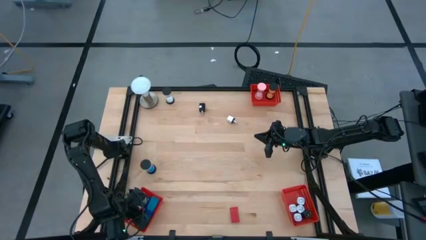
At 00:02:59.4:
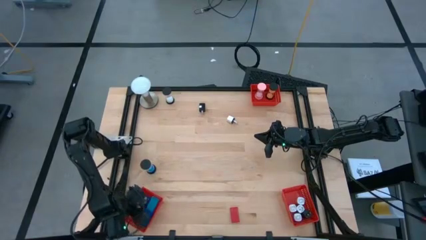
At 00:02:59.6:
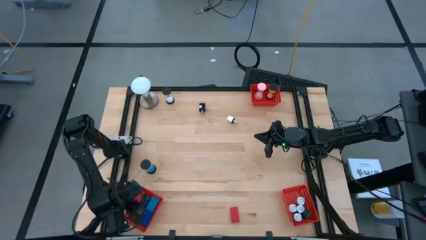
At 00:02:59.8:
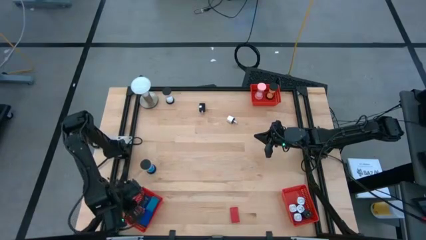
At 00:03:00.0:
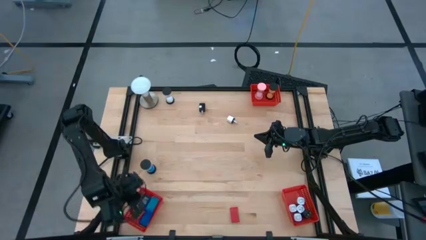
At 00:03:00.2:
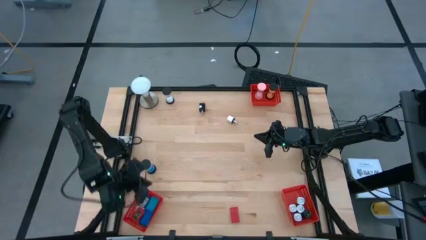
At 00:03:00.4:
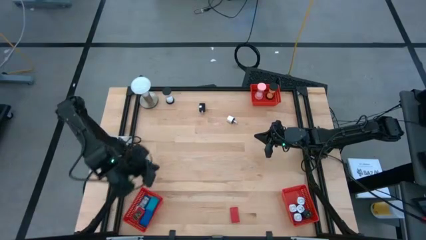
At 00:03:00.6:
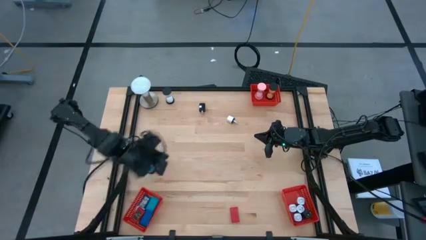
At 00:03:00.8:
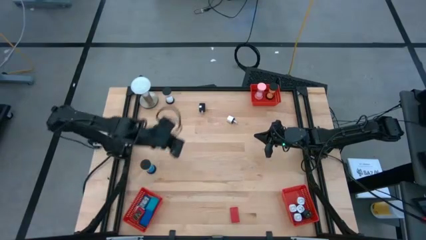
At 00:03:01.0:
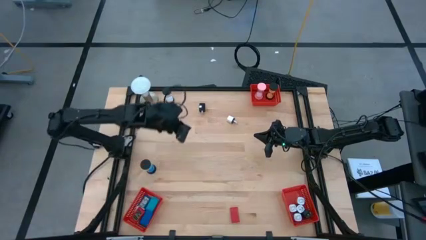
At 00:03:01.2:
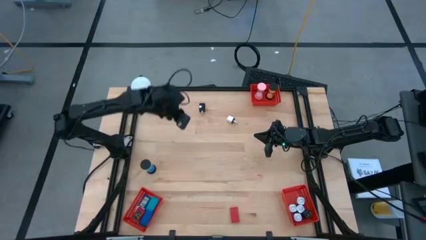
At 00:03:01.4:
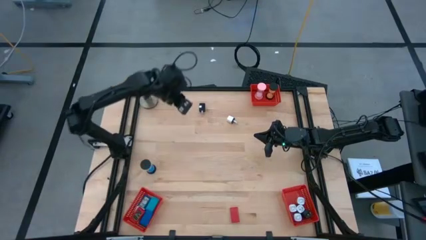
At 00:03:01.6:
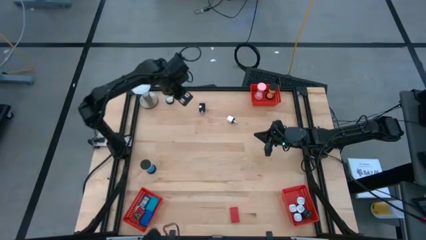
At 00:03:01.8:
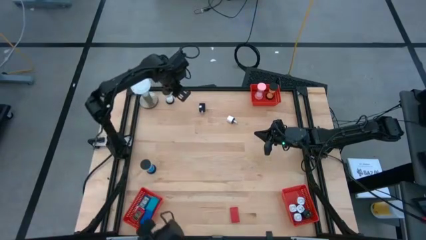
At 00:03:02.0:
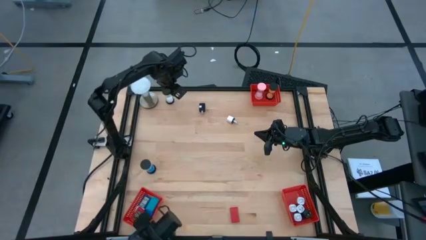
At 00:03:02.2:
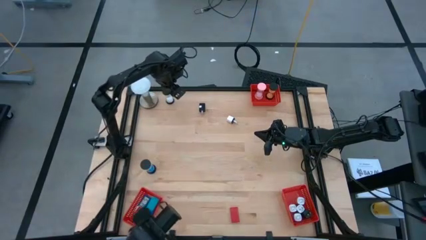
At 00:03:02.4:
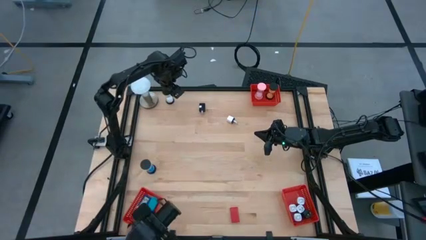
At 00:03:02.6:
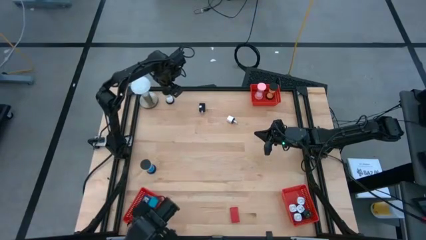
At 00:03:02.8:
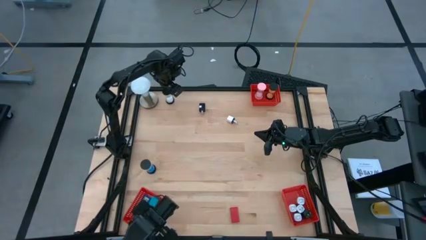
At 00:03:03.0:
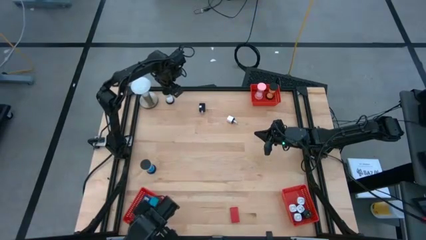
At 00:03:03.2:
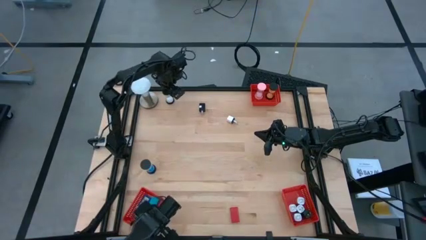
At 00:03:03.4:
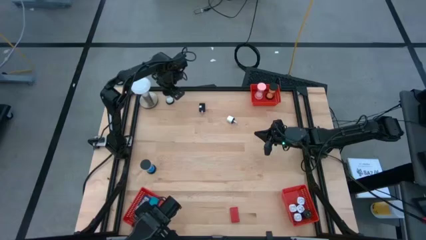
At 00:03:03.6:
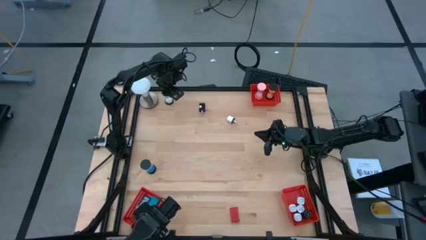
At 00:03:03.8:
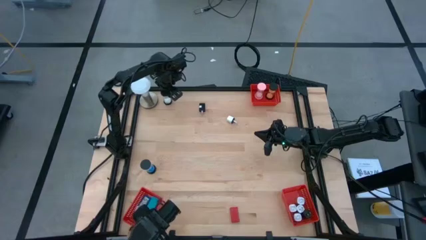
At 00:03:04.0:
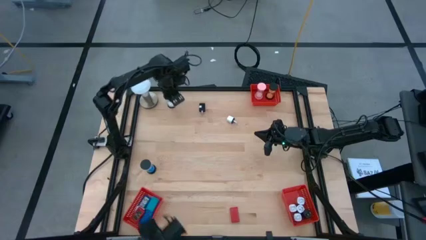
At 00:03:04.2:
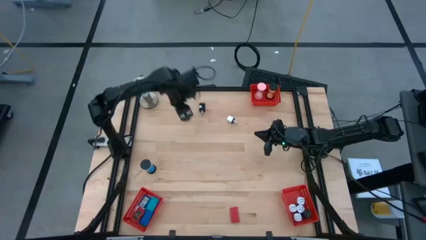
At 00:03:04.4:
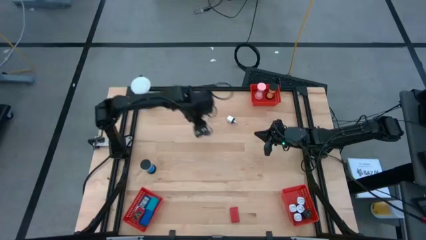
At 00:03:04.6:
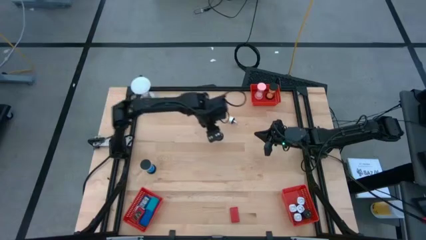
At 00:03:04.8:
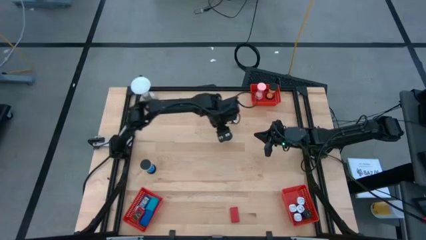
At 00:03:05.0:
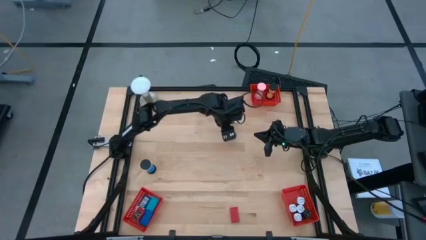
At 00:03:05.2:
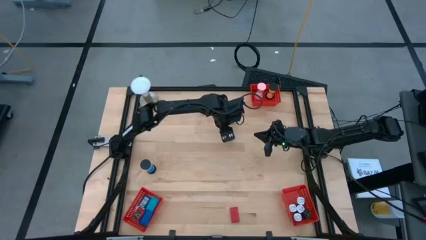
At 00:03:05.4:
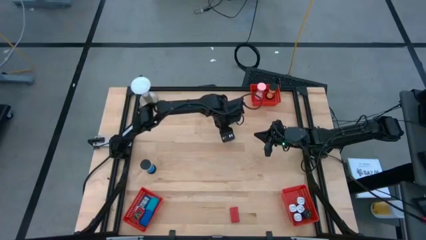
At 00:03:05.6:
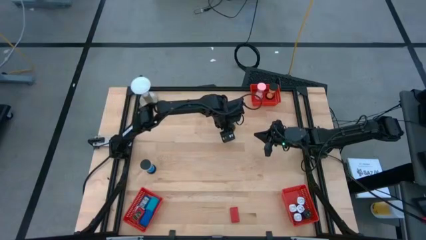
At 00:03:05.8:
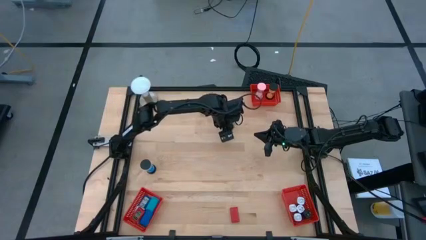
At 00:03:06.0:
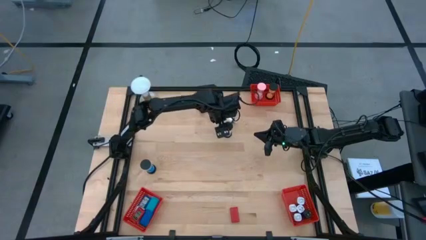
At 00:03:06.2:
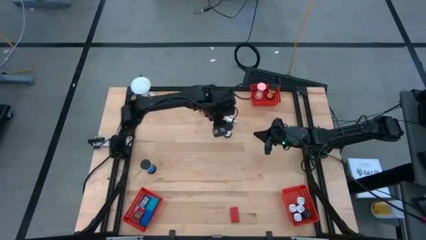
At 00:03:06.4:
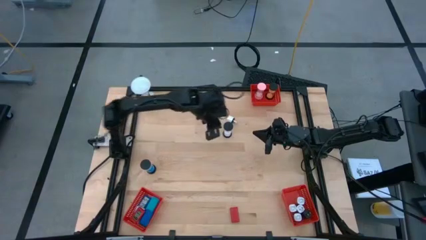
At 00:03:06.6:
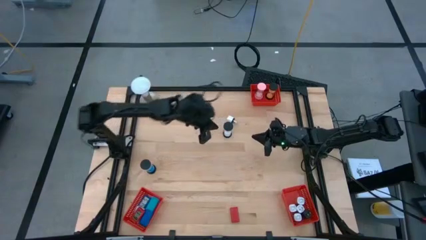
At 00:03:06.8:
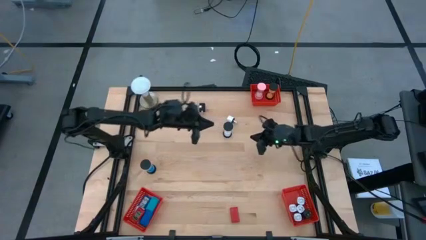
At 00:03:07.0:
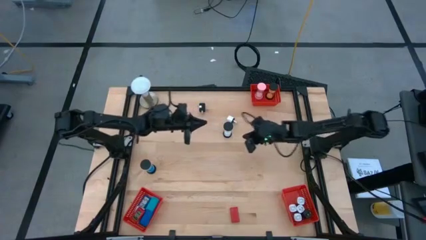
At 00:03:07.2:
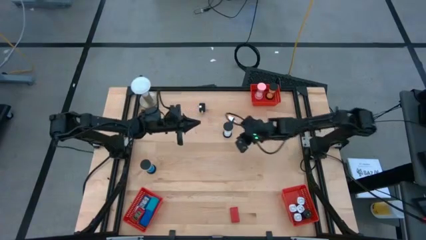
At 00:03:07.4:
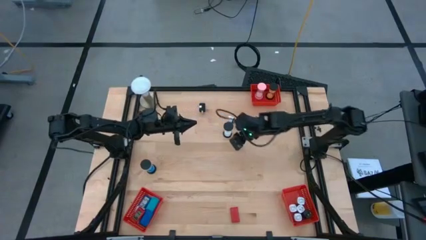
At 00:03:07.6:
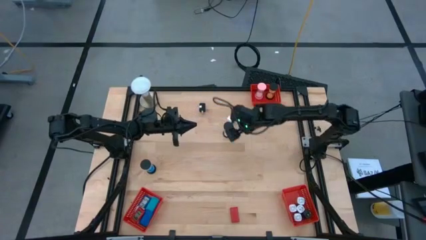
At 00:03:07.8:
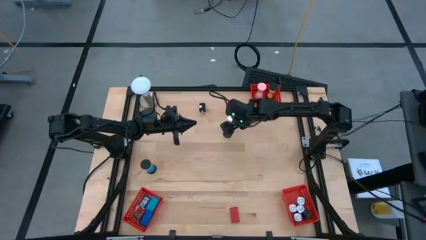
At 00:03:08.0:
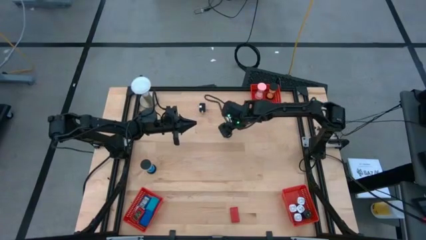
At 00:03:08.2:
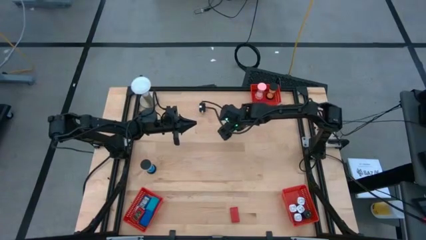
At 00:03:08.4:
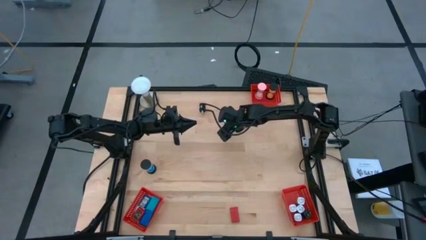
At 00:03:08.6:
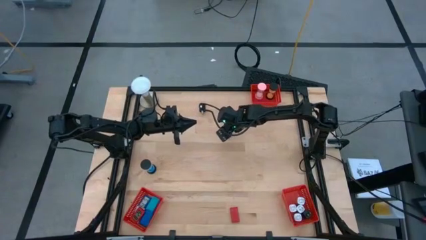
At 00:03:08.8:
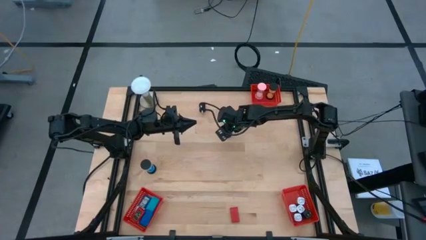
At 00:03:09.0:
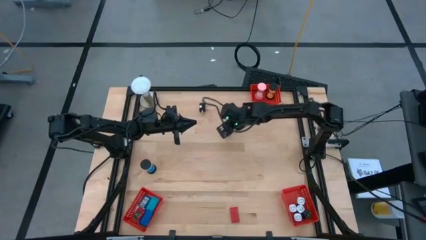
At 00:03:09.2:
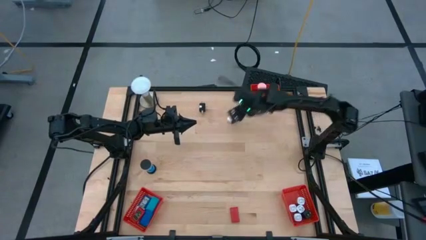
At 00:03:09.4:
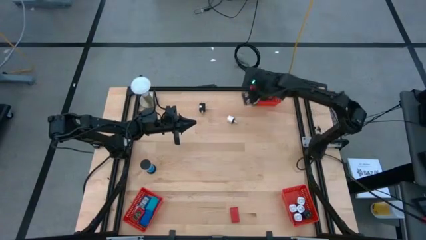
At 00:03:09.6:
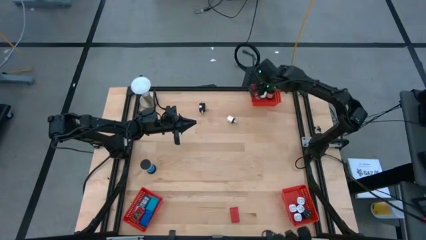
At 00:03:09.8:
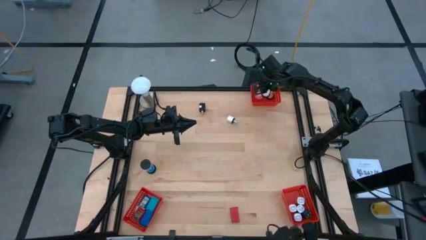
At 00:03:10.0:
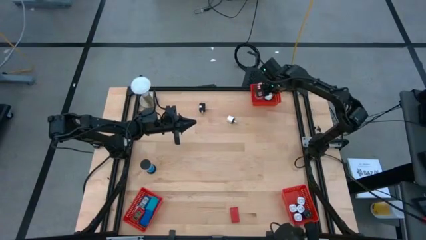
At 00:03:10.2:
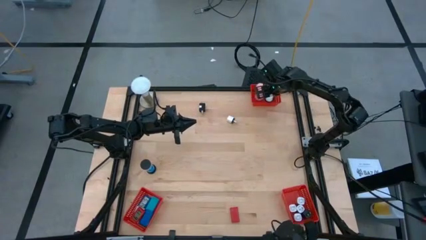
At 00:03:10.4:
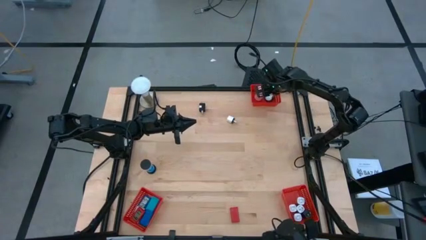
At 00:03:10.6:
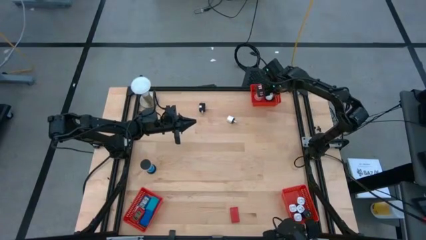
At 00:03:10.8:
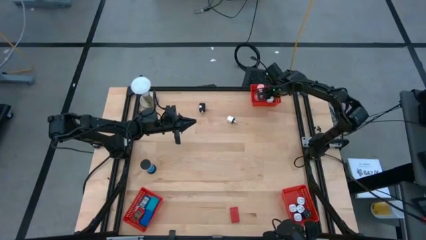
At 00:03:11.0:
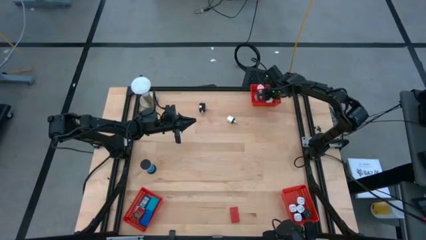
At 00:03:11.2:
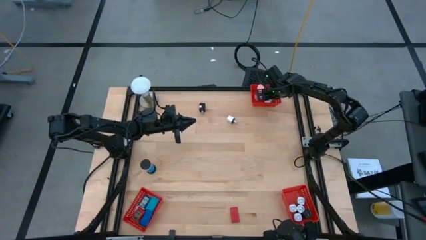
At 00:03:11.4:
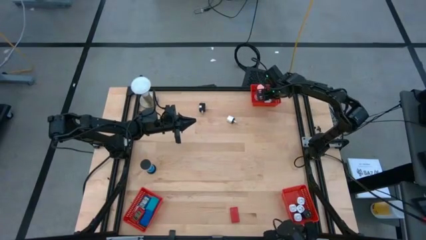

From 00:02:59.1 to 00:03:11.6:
Task: Pick & Place Office items
Put the white hourglass into the top red basket

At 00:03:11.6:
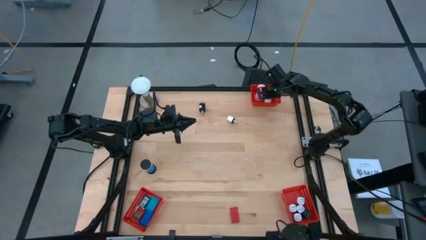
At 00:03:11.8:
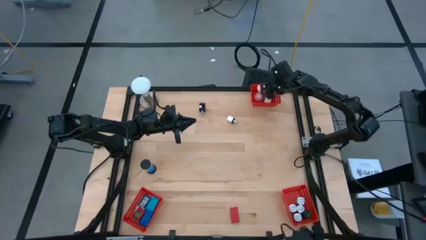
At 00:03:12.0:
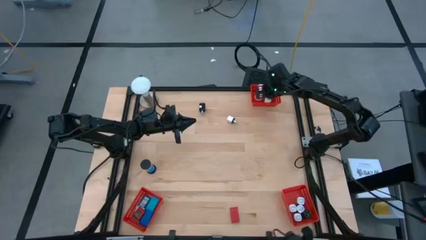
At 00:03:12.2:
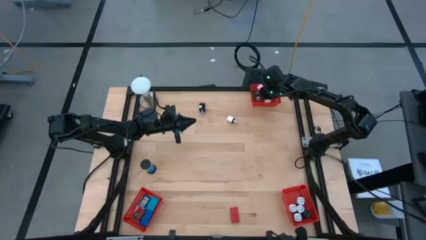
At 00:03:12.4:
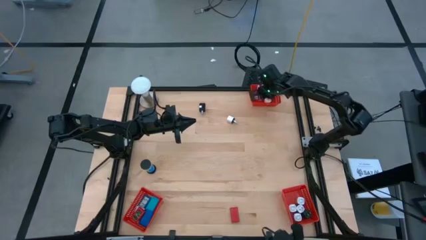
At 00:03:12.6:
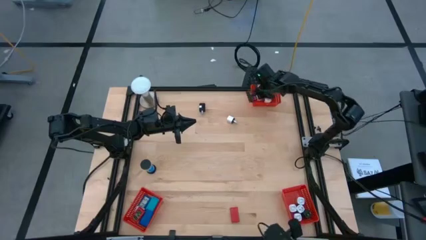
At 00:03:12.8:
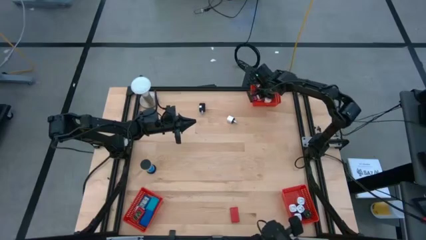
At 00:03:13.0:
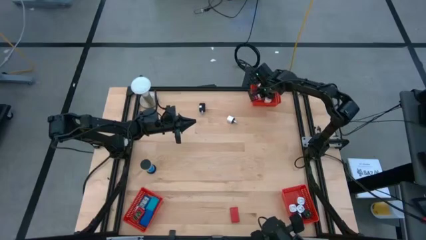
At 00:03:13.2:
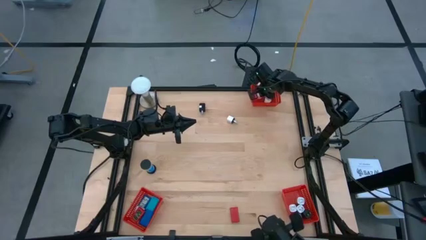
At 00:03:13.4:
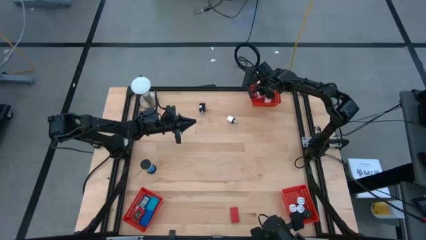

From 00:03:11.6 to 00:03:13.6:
Adjust the pink hourglass in the red basket

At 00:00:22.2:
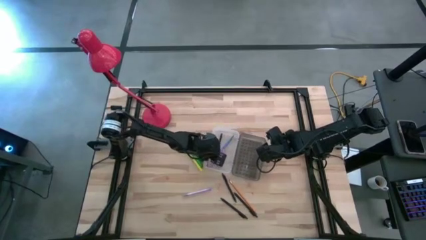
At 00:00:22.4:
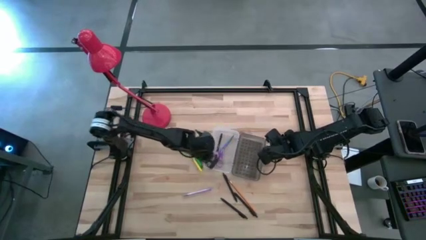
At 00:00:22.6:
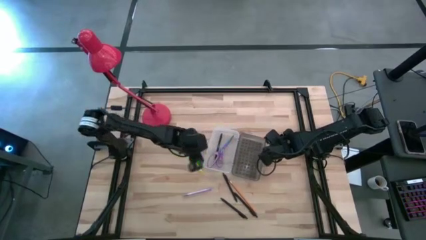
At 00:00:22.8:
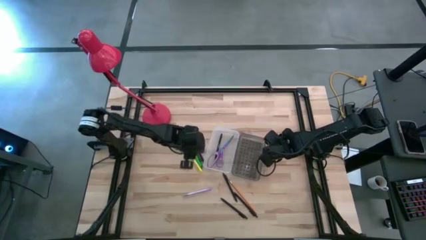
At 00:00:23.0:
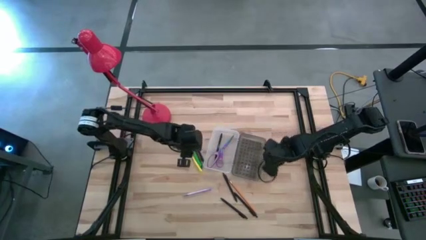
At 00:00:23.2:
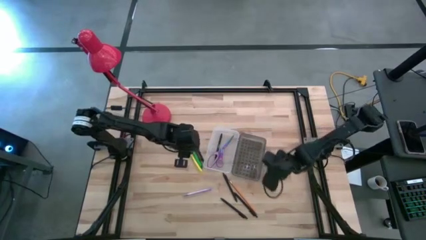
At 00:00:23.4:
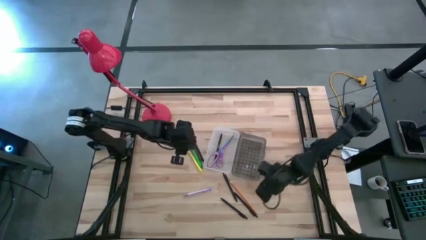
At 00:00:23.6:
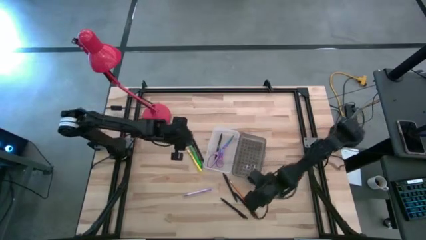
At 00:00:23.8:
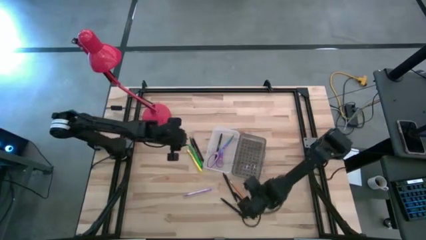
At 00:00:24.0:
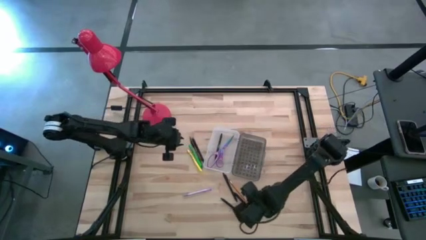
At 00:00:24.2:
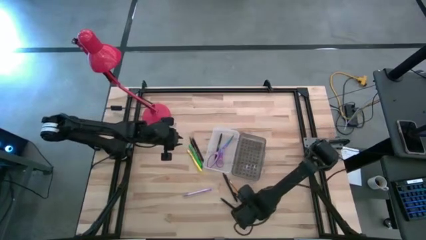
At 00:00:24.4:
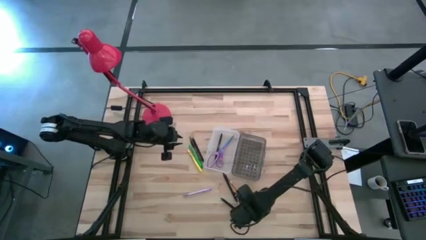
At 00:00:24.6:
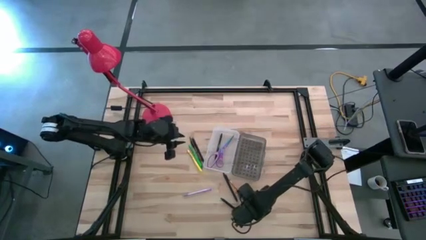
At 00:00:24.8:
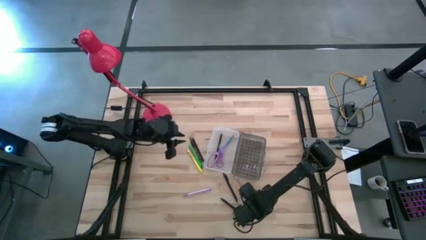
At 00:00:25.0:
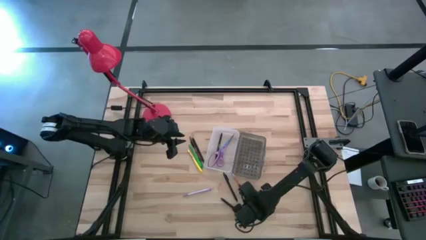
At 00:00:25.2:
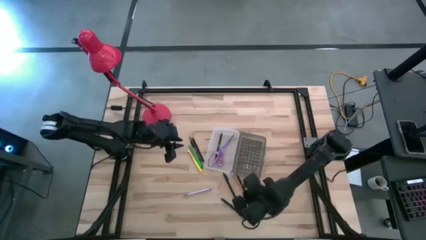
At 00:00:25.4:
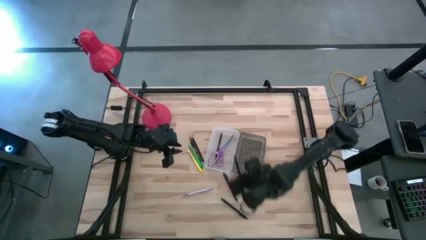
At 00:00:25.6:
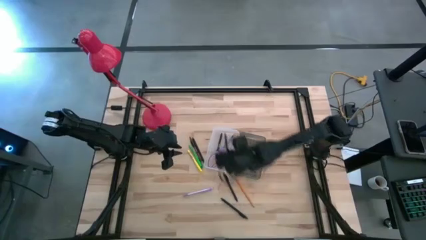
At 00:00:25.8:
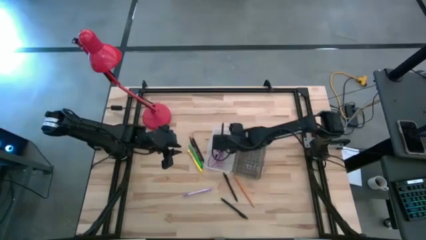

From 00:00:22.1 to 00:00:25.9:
Task: Pick & place school supplies into a supply box
Put the black pen into the supply box
